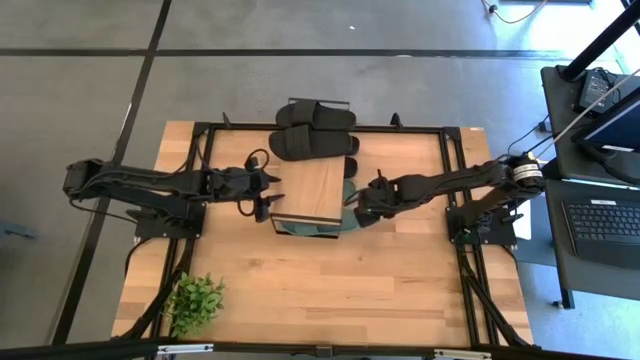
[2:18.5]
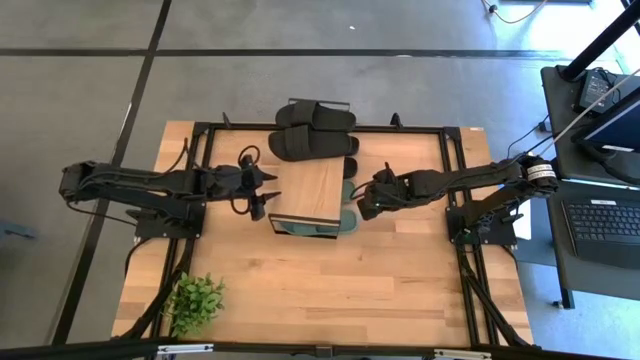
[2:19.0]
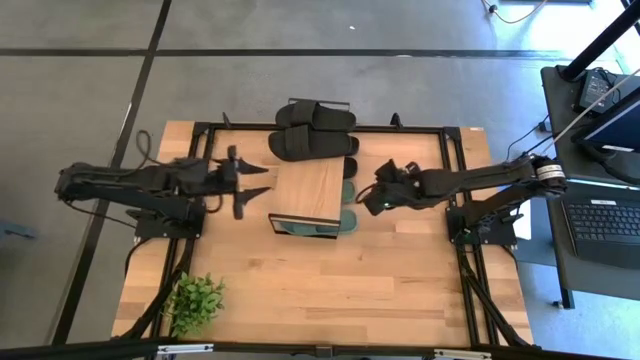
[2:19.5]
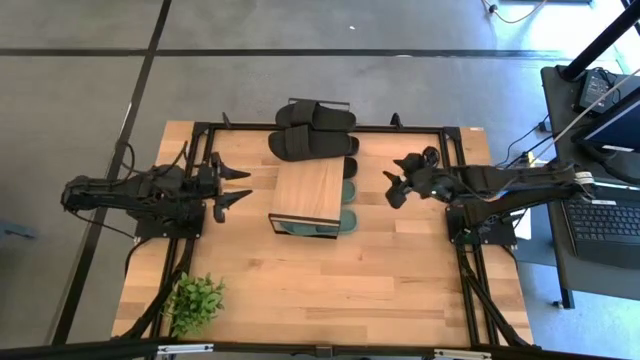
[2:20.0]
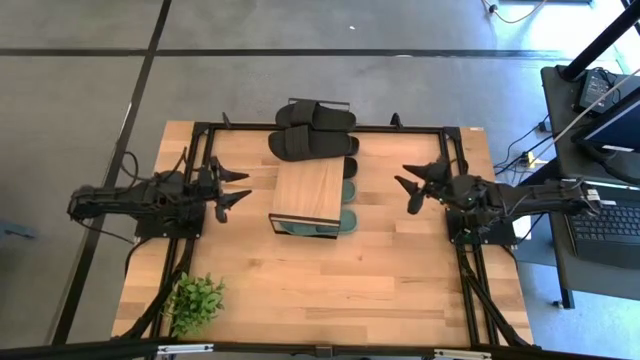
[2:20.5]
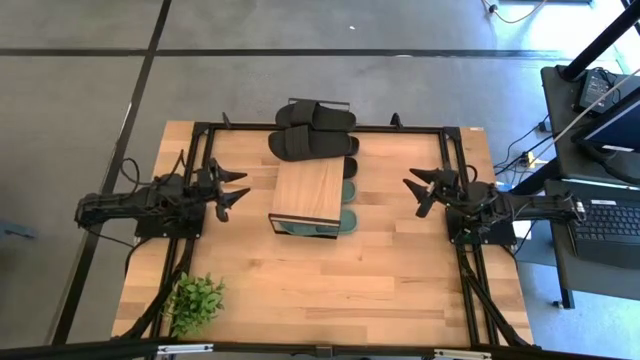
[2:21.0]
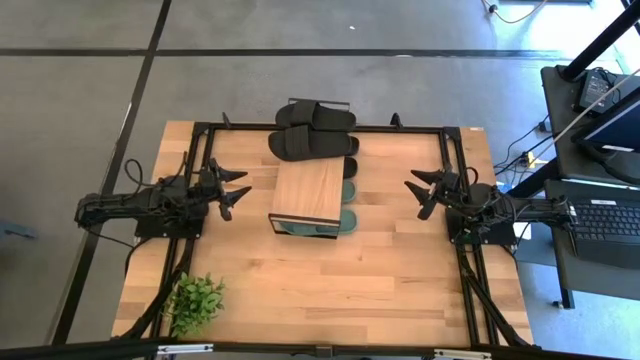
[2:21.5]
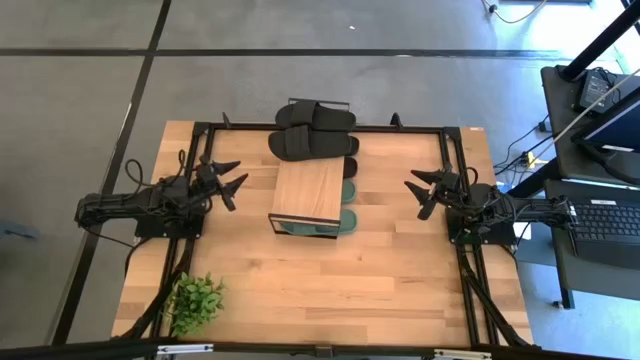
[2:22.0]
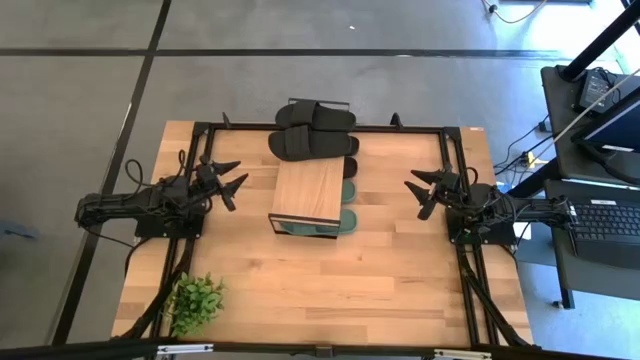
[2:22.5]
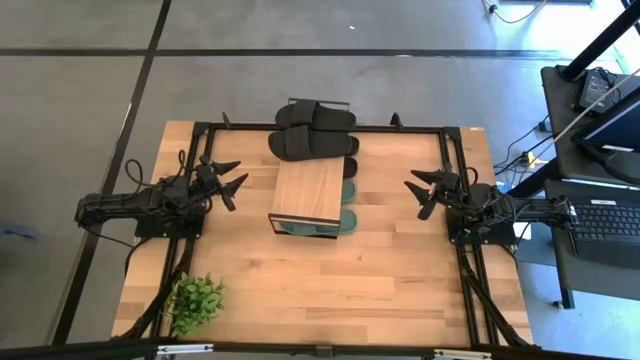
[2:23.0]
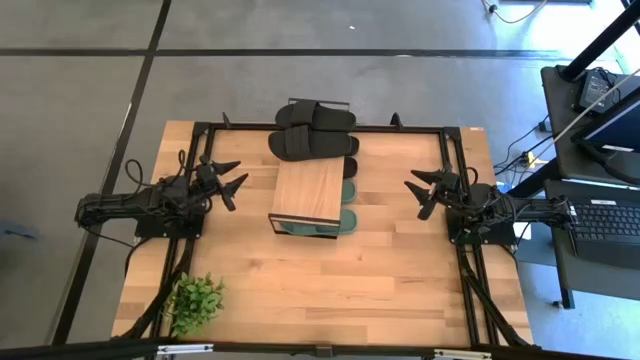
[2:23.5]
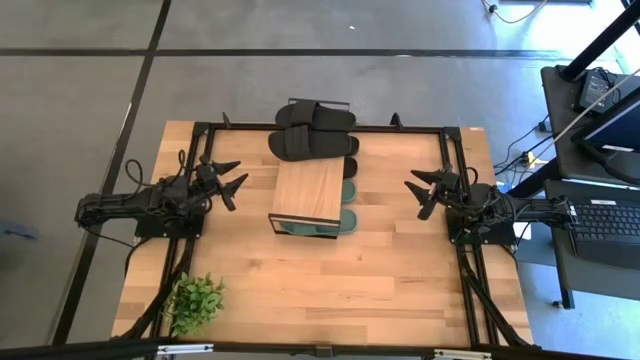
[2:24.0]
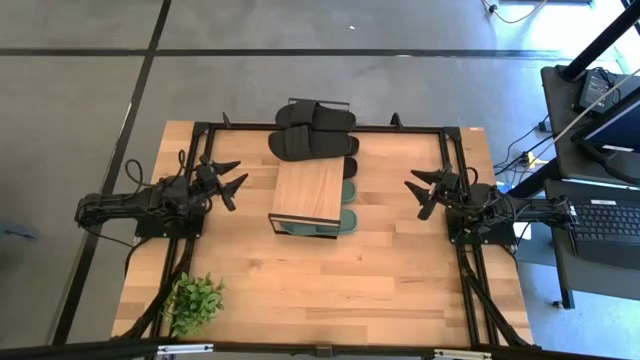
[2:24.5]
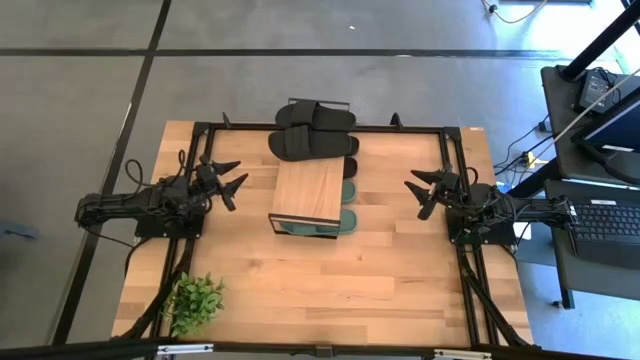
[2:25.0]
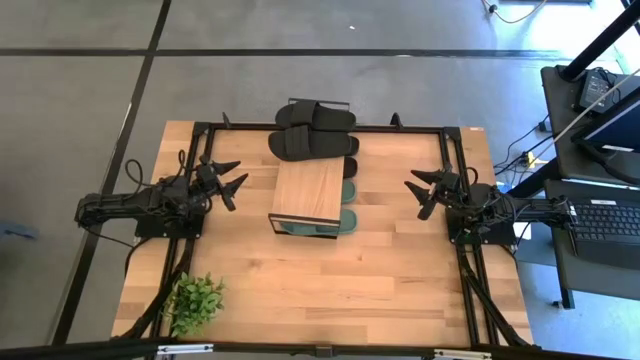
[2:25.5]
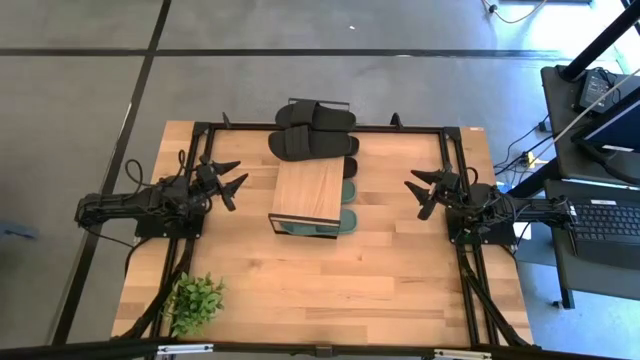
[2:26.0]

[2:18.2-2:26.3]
Task: Pick and place slides into the shelf
Return to Home Position

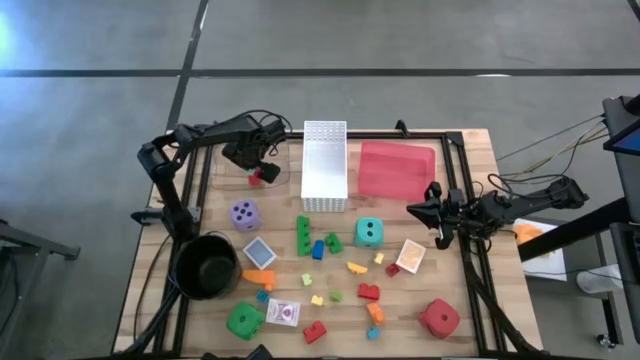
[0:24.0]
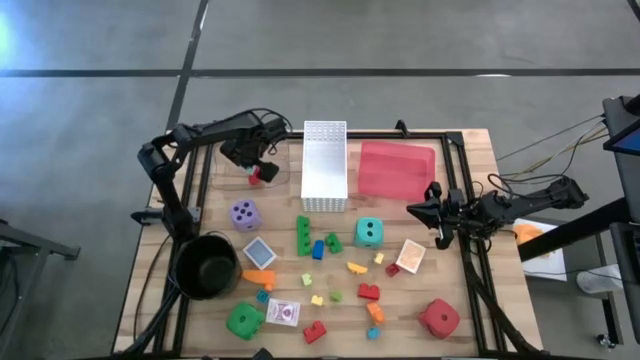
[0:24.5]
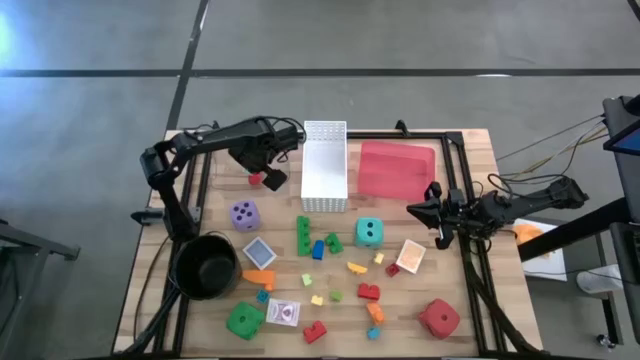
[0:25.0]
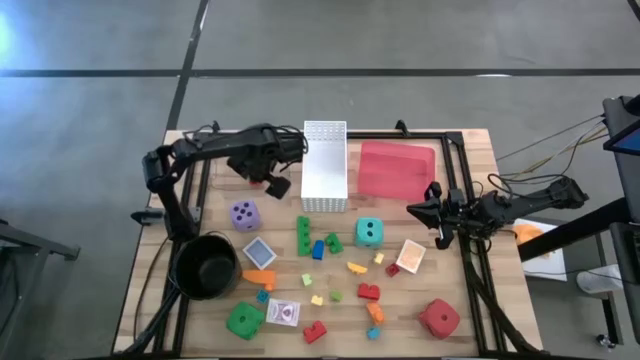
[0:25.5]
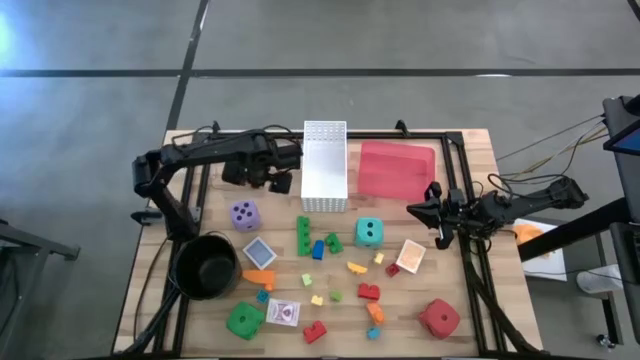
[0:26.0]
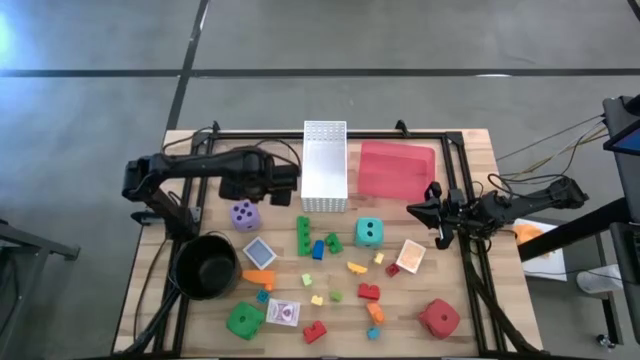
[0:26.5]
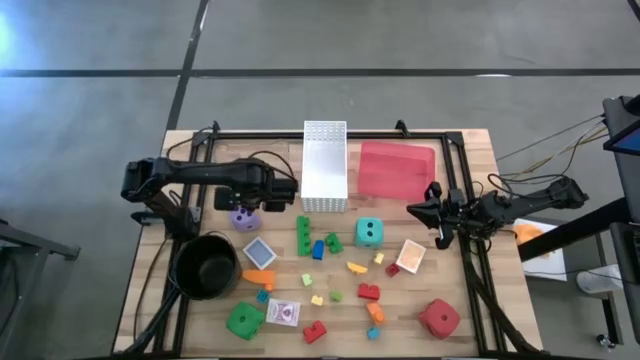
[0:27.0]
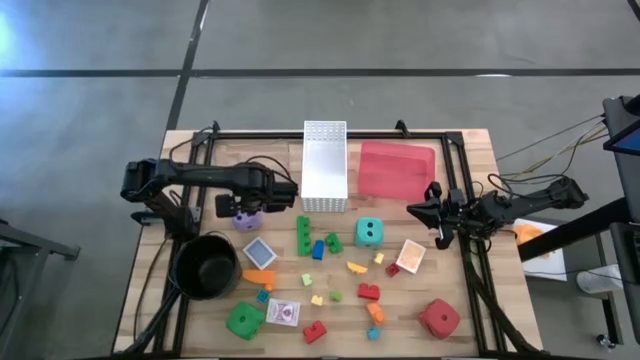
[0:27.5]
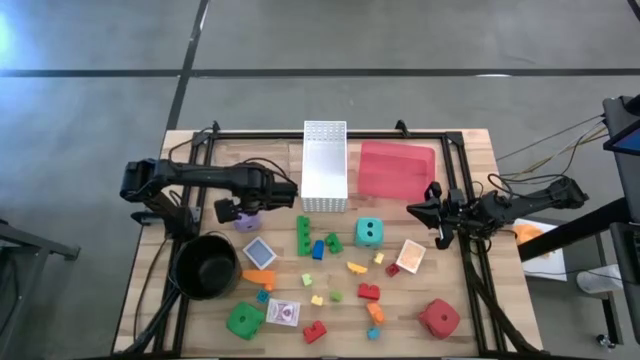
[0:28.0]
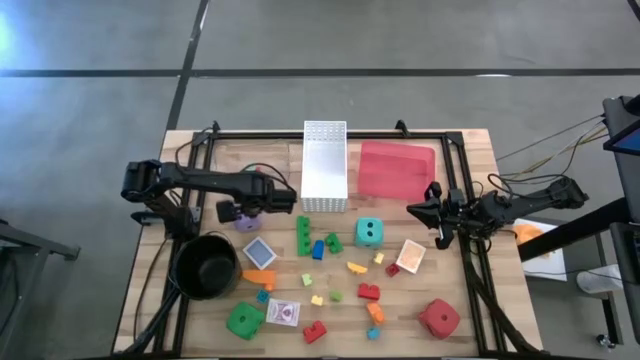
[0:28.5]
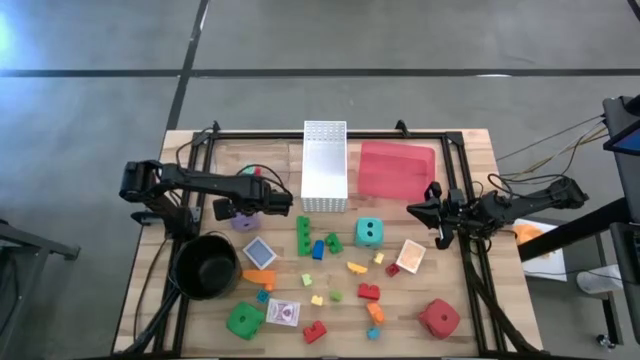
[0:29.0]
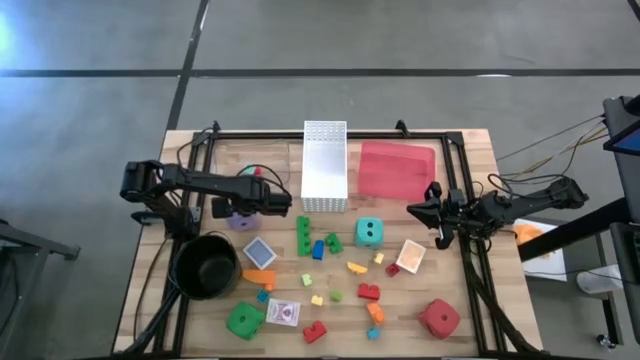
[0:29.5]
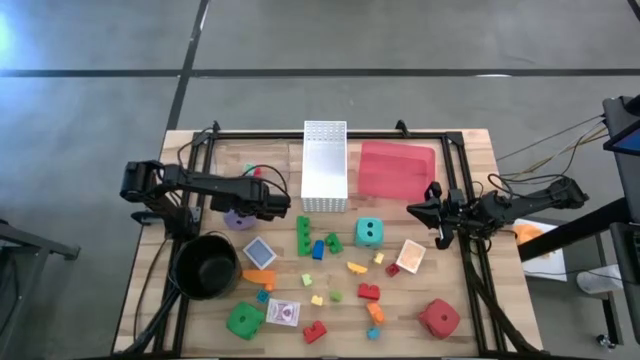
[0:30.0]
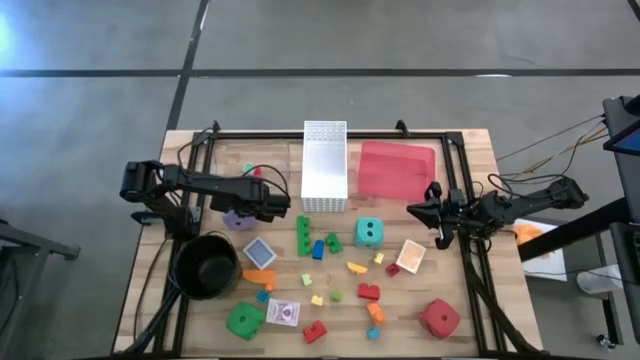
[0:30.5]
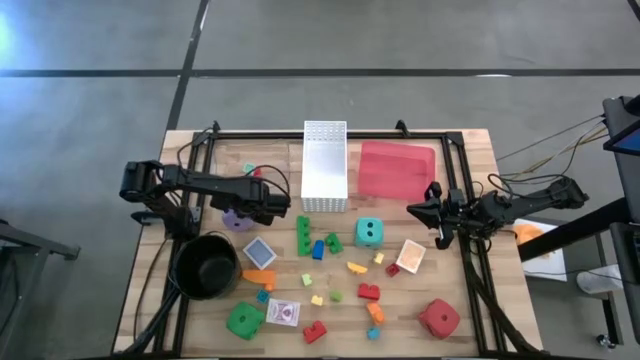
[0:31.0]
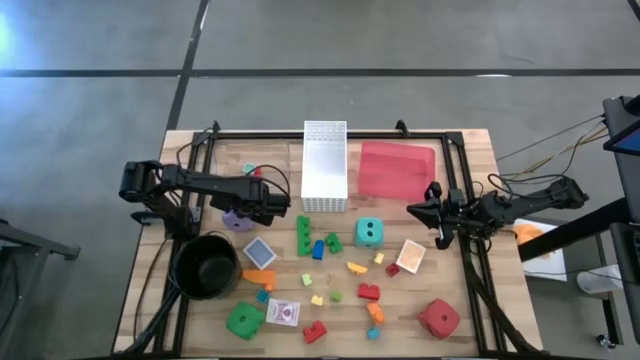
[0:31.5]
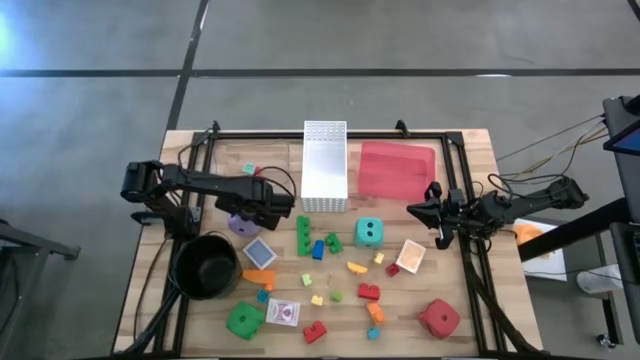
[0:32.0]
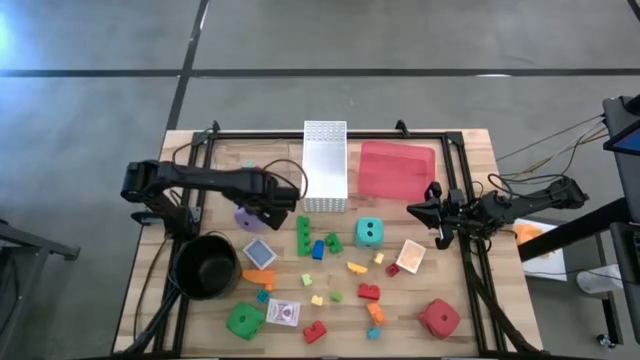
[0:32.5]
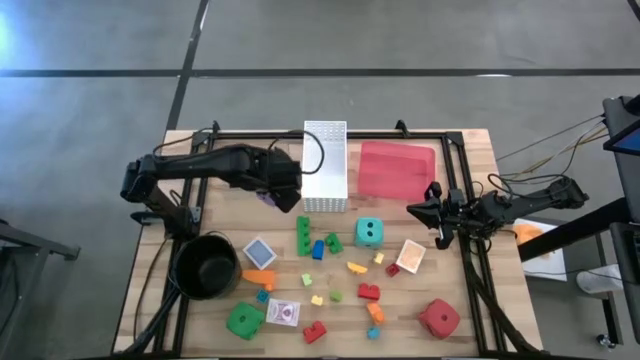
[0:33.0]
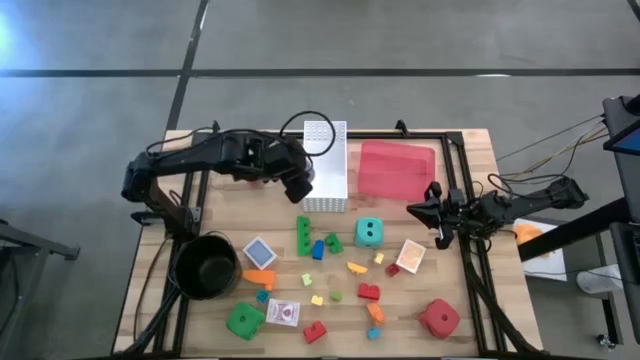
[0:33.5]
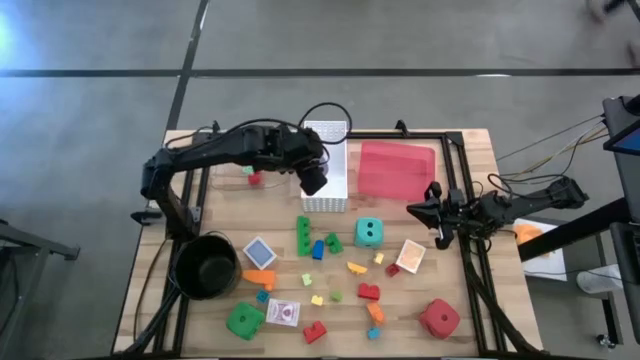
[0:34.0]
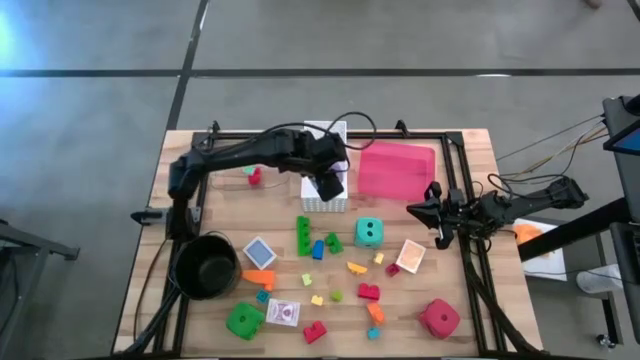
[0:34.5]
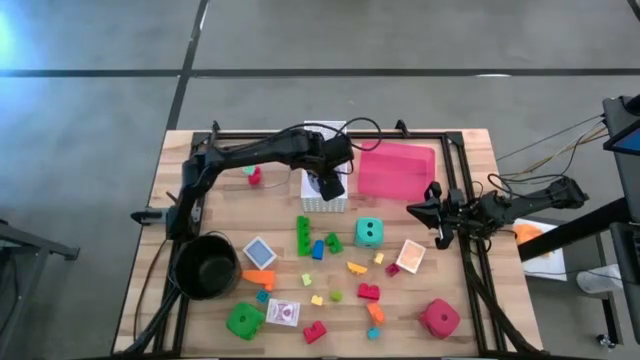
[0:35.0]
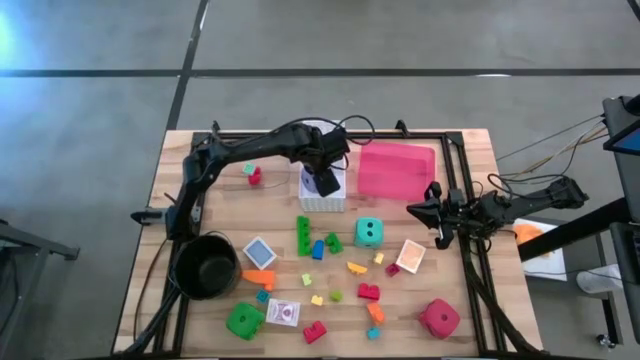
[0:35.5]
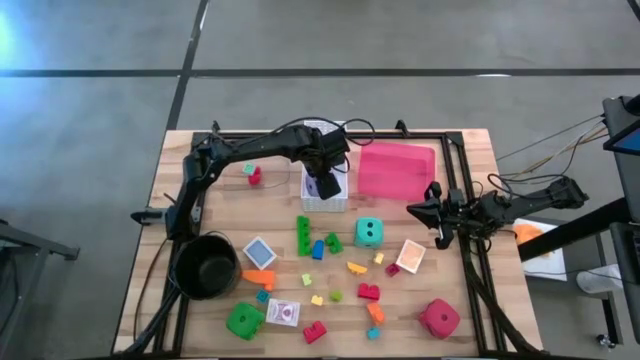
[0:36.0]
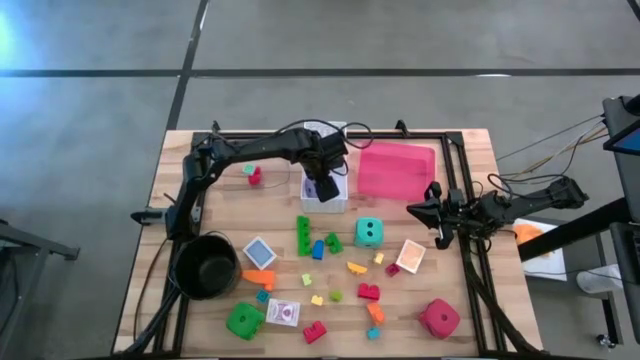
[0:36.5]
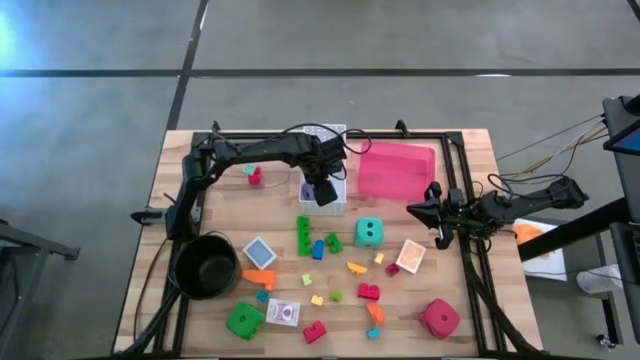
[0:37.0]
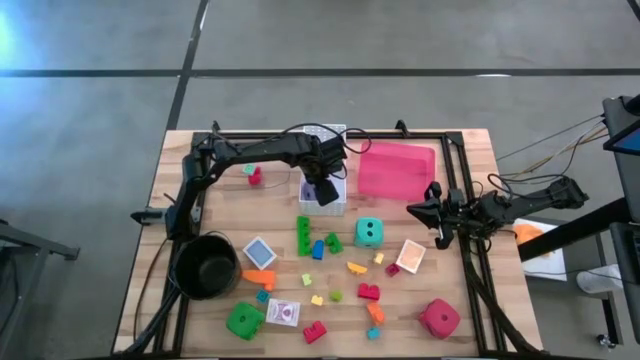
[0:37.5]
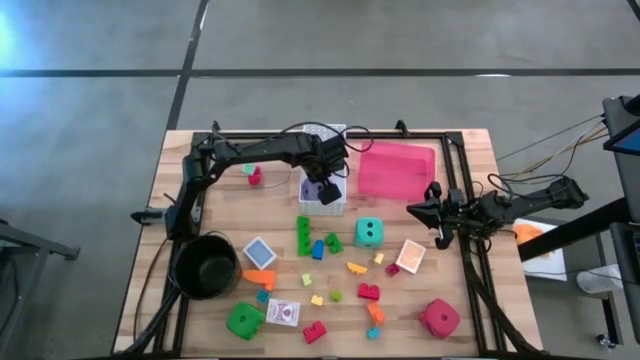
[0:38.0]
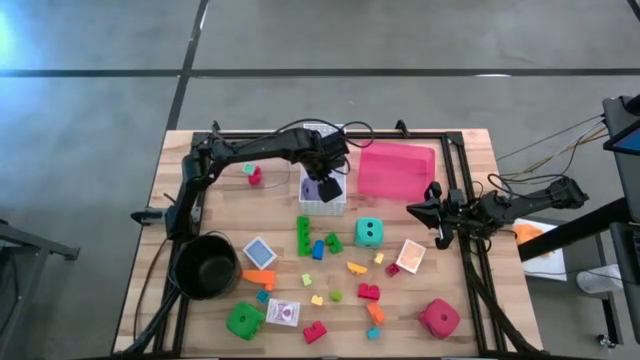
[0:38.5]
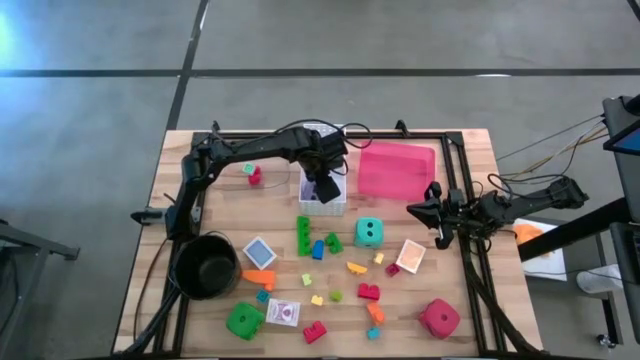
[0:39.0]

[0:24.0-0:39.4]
Task: Pick & Place Toys
Put the purple dice into the white bin
